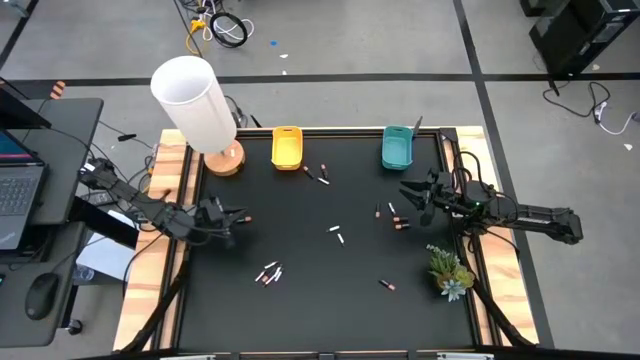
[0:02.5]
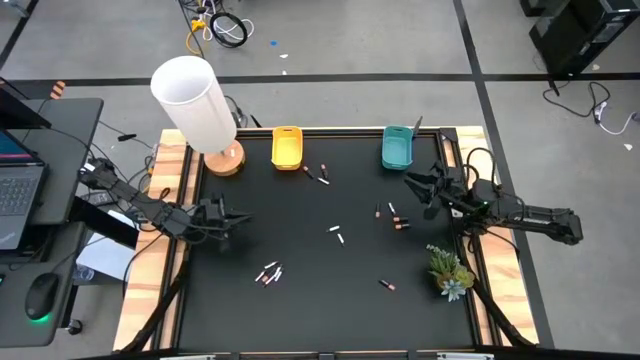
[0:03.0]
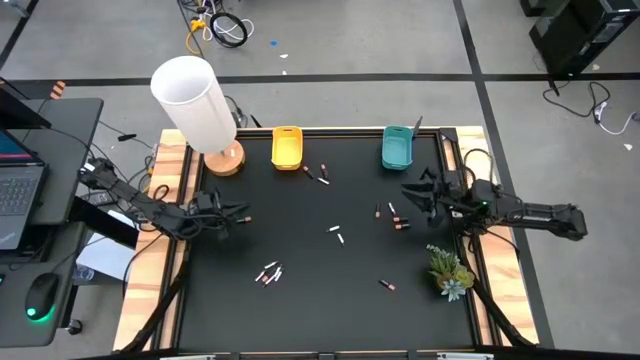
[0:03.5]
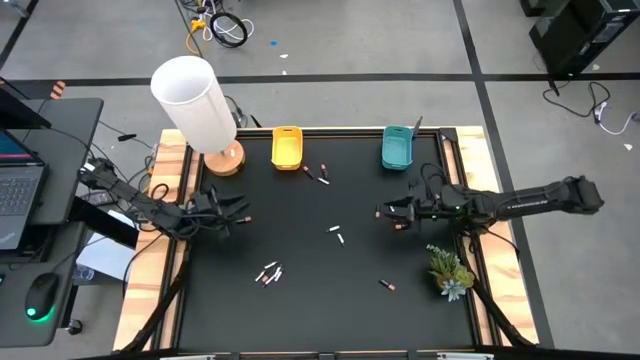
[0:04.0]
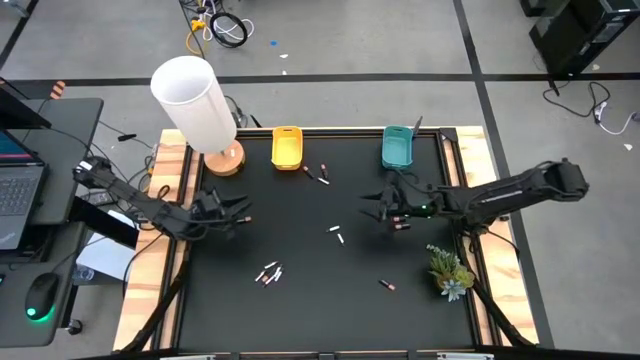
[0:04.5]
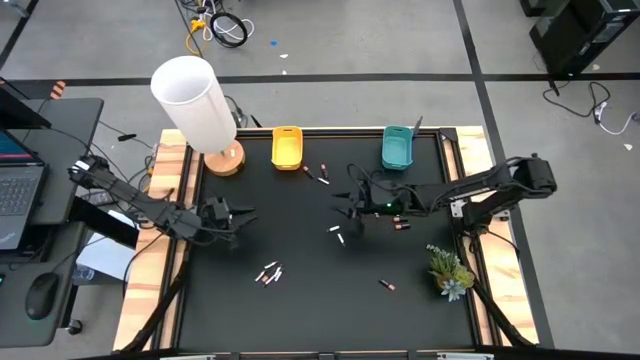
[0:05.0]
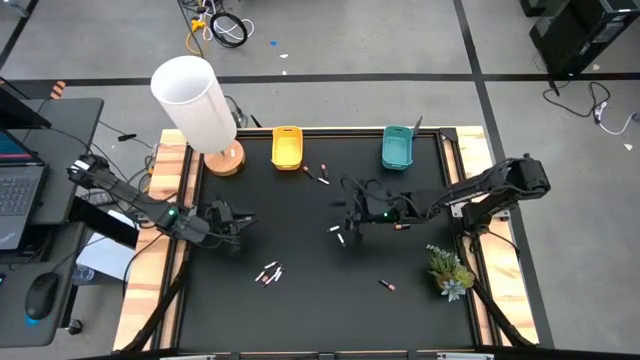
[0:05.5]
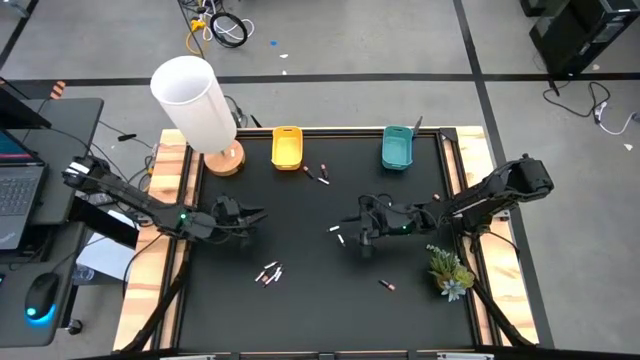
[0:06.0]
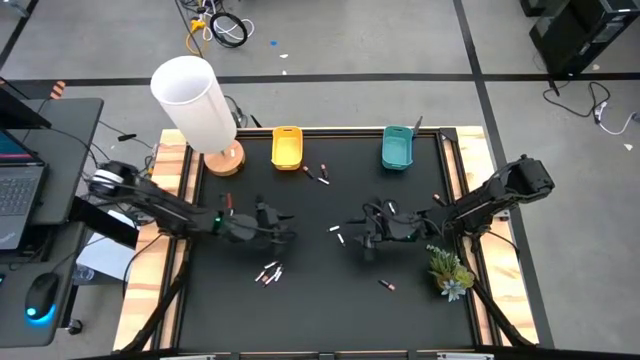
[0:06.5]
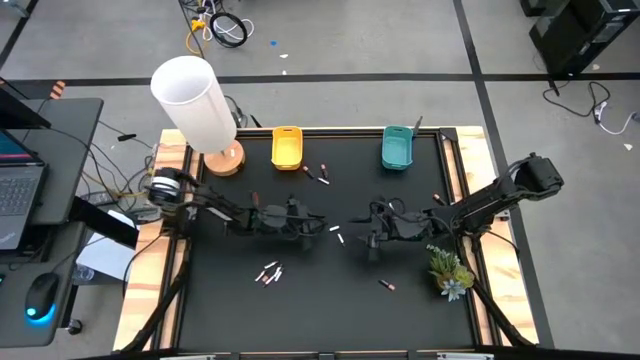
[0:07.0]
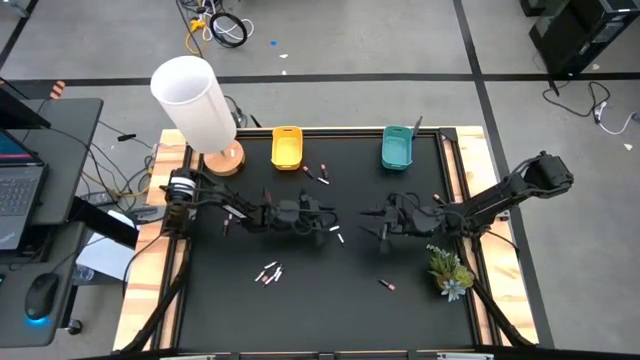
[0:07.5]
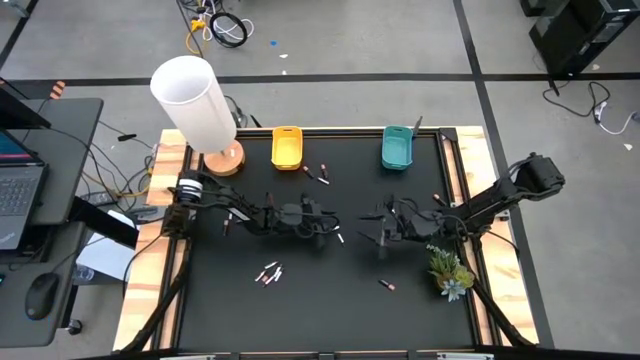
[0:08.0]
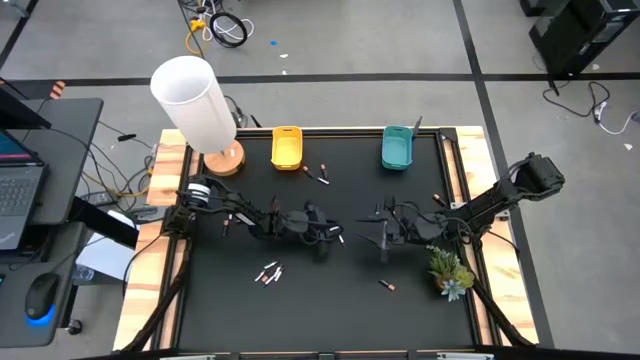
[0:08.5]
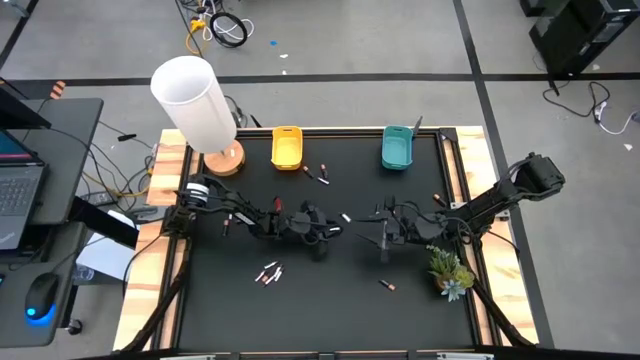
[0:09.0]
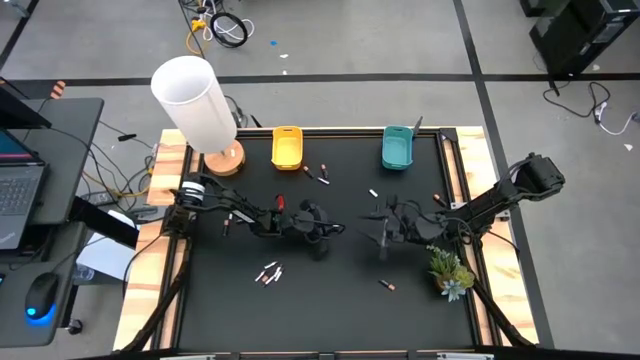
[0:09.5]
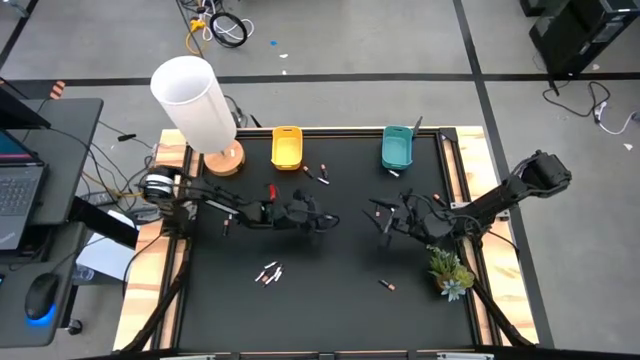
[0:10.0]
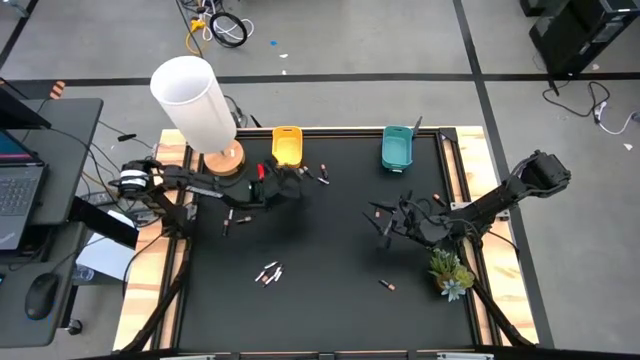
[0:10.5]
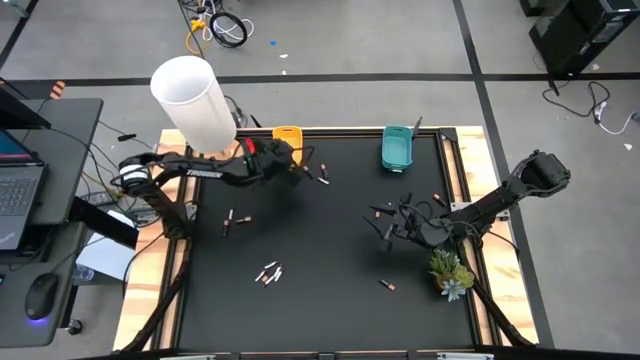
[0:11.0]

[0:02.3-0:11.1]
Task: Sort batteries
Put the silver battery into the yellow bin

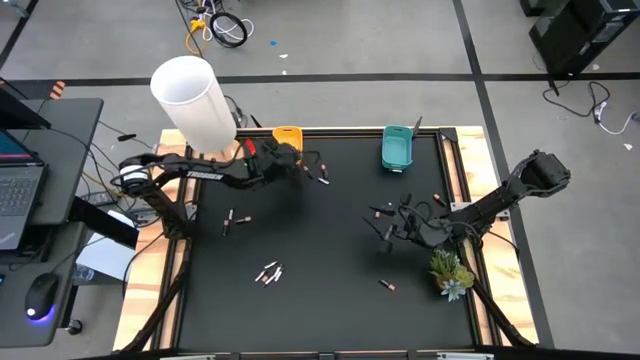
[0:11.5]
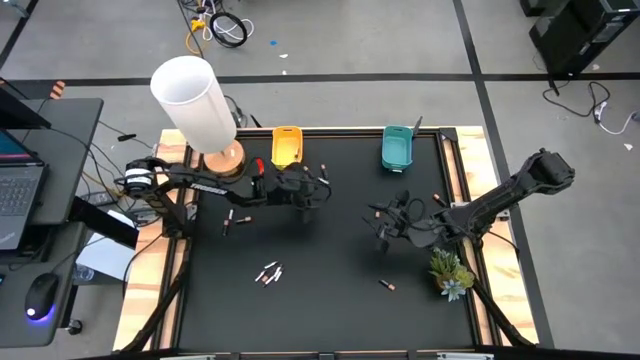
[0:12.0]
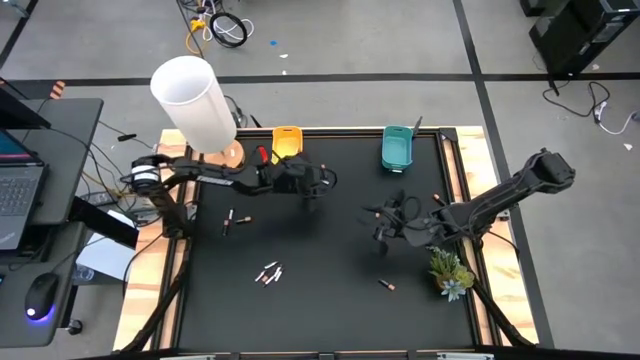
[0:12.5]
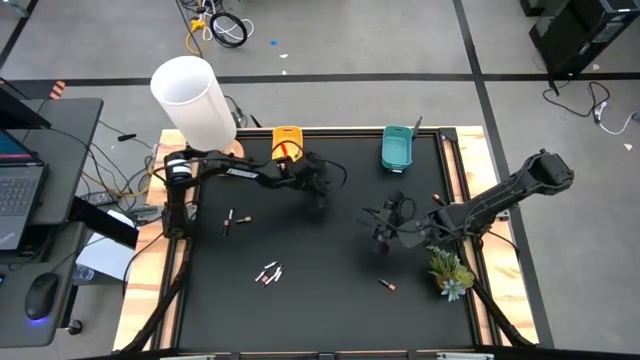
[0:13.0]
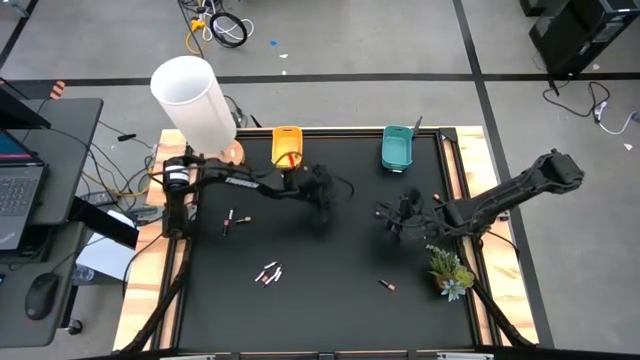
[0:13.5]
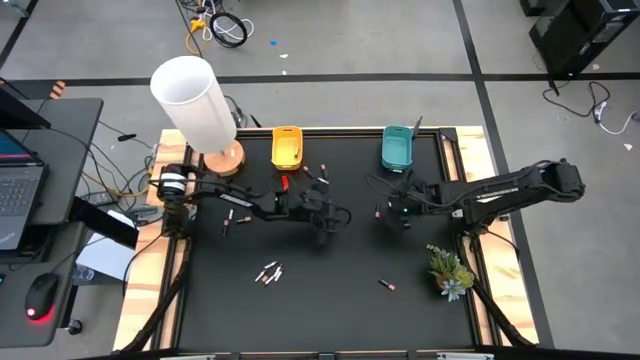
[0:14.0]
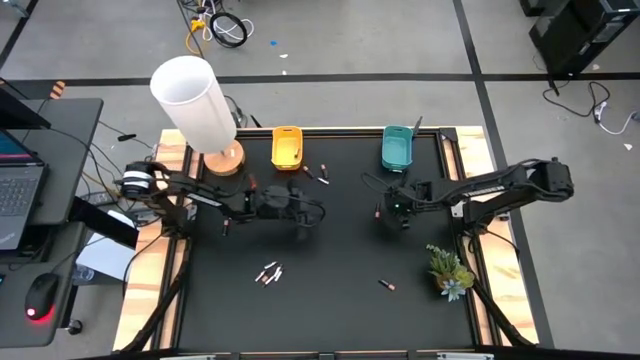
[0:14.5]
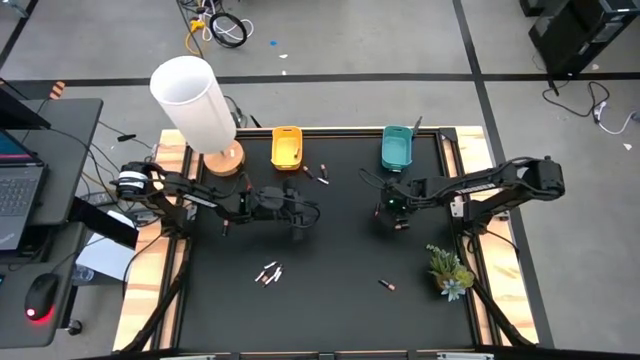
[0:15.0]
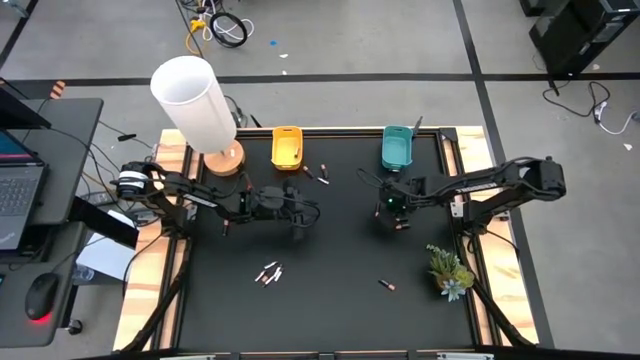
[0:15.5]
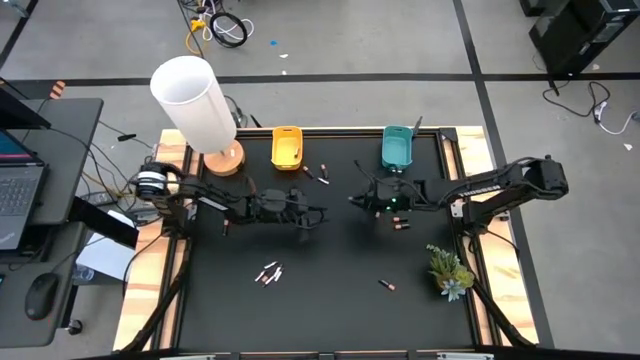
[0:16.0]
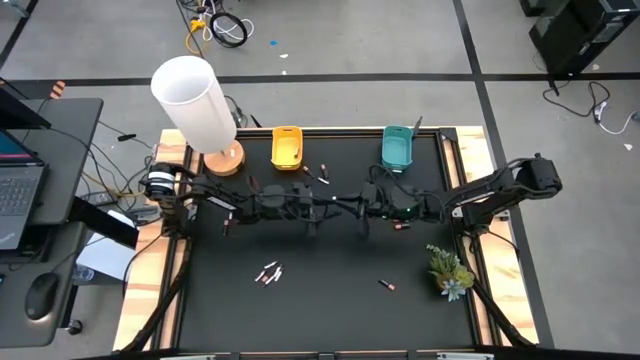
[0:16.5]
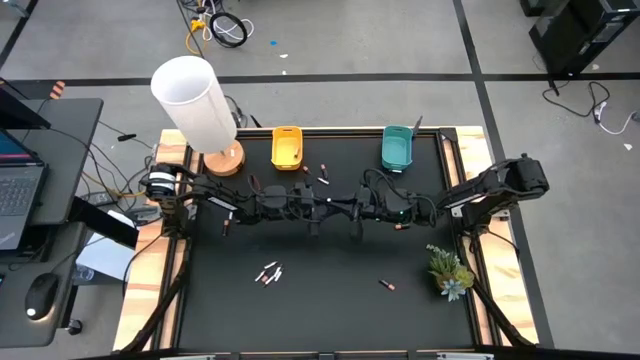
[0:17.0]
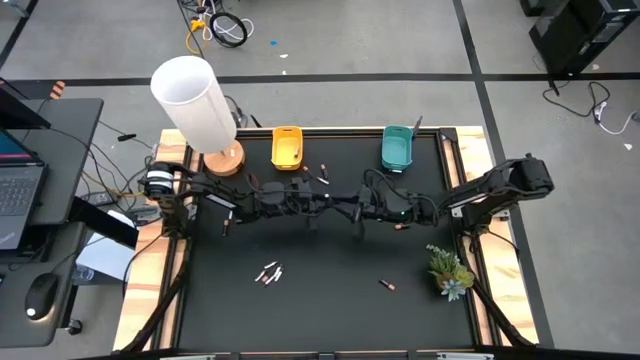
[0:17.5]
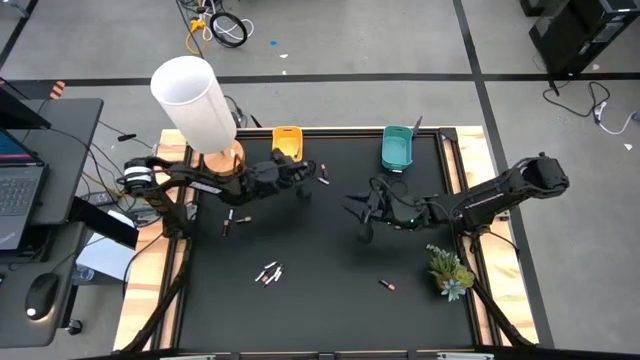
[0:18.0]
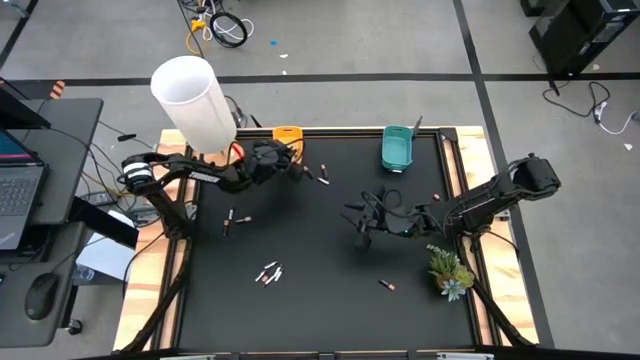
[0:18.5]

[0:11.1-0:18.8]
Put the silver battery into the yellow bin

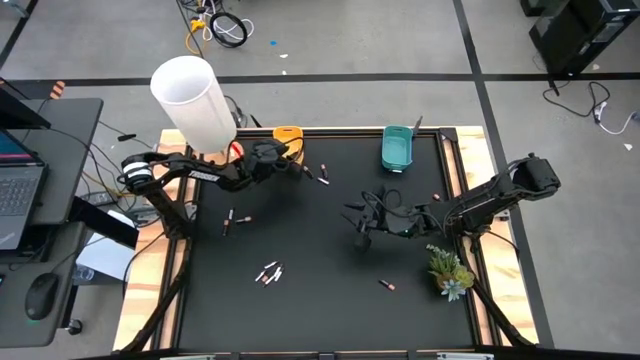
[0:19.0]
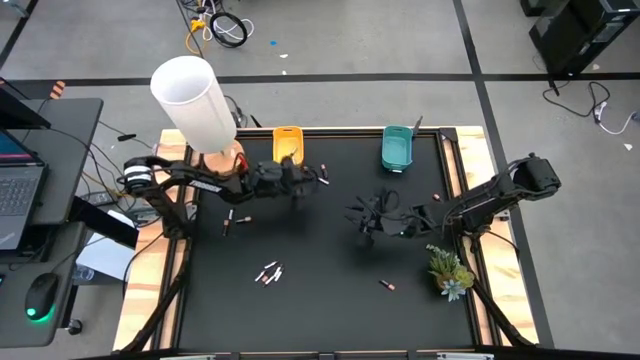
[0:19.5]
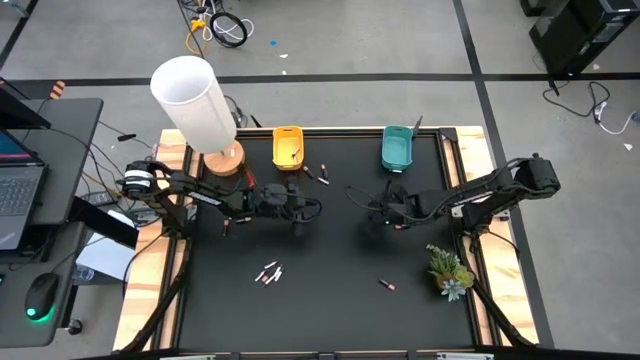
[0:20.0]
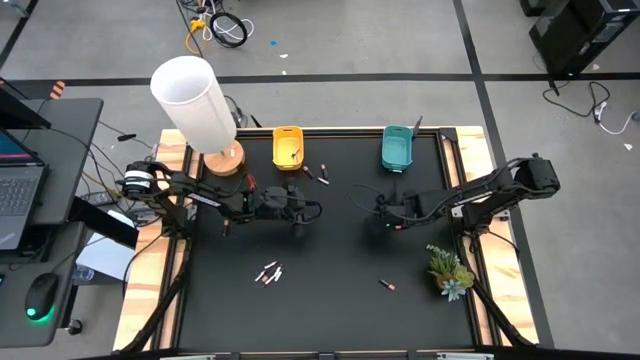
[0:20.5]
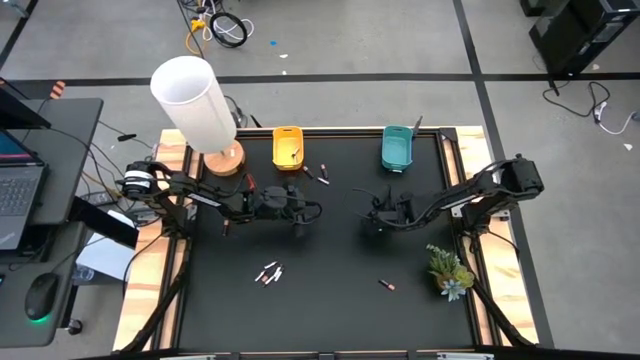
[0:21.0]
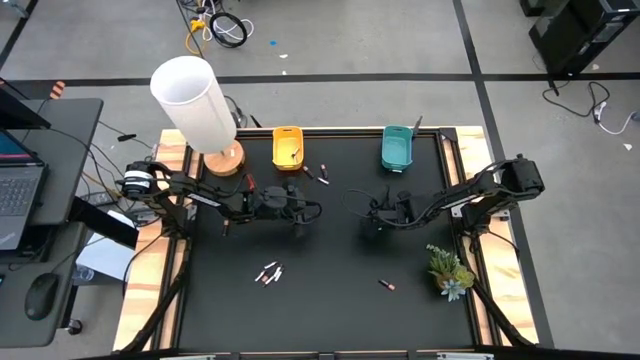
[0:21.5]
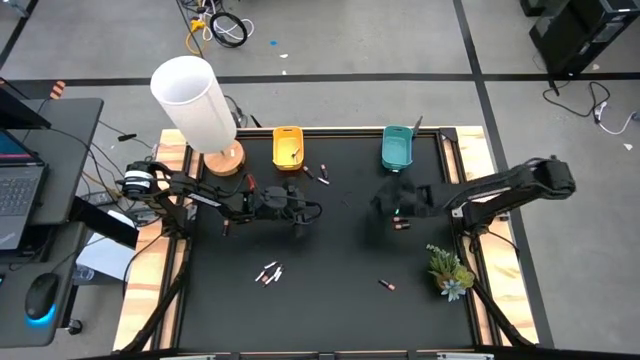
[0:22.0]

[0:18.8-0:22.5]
Put the black battery into the blue bin
